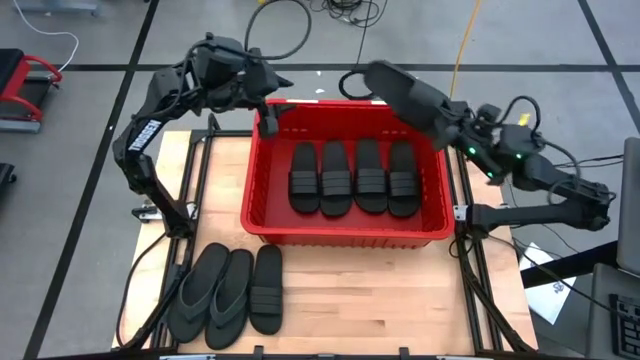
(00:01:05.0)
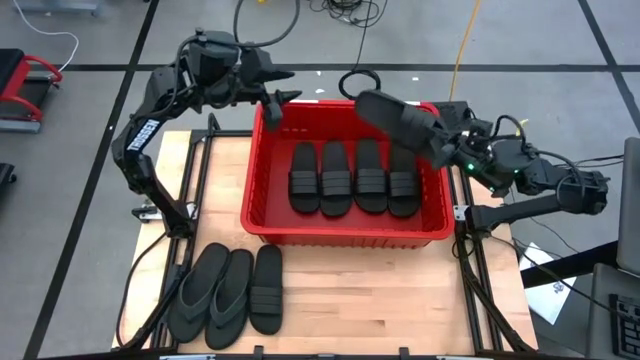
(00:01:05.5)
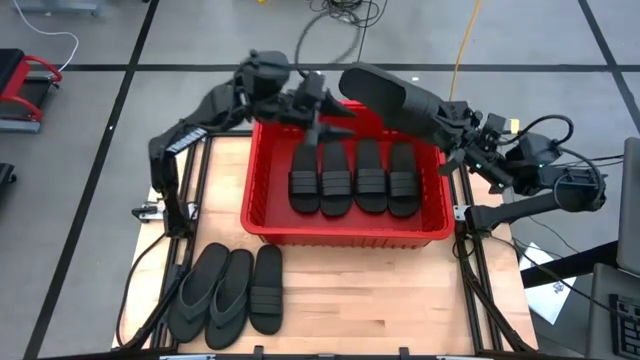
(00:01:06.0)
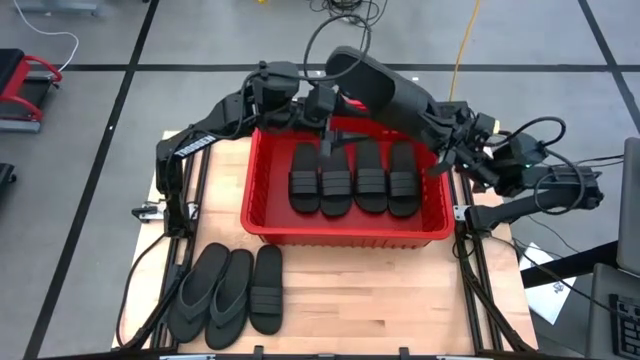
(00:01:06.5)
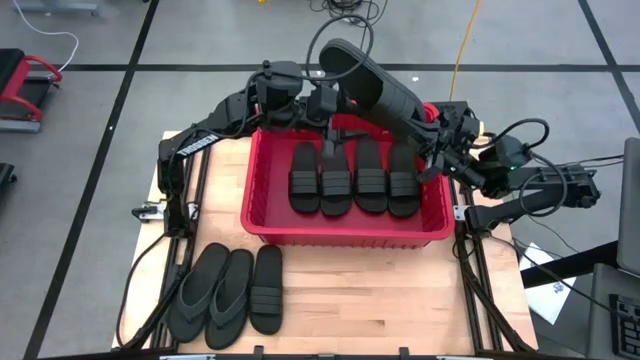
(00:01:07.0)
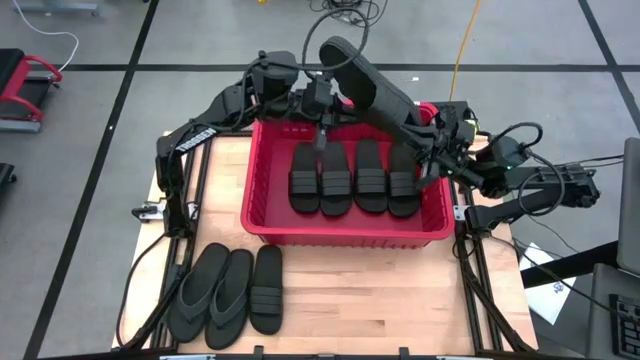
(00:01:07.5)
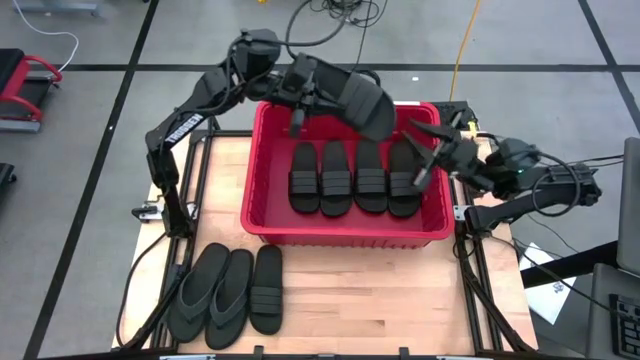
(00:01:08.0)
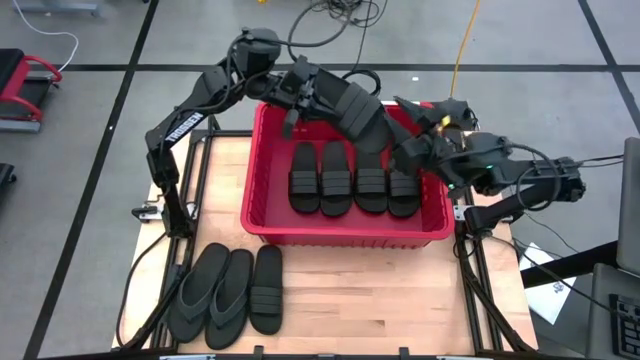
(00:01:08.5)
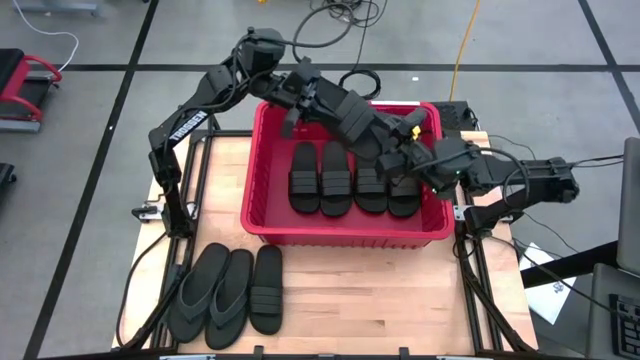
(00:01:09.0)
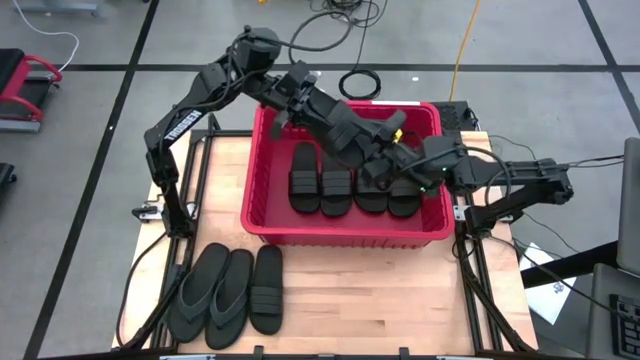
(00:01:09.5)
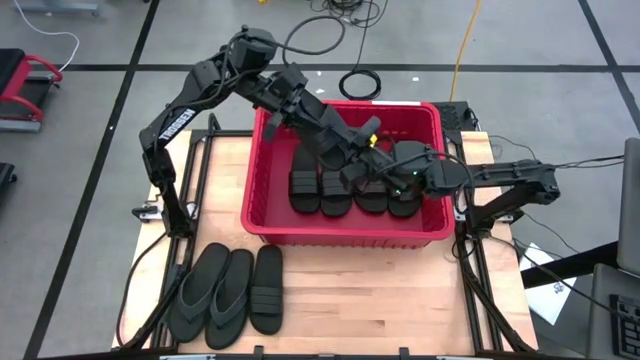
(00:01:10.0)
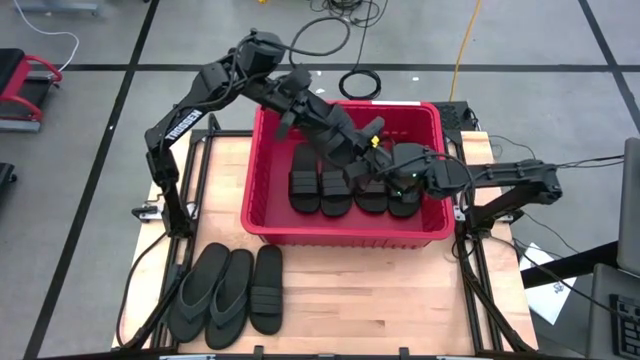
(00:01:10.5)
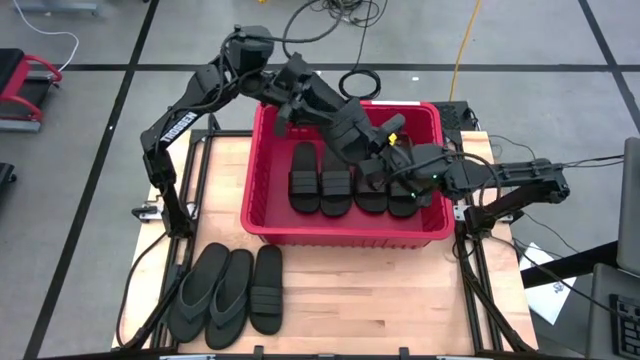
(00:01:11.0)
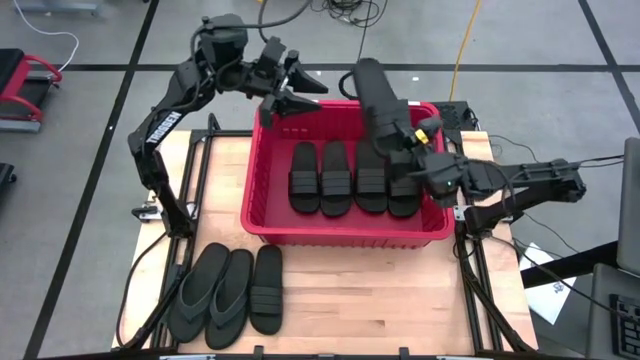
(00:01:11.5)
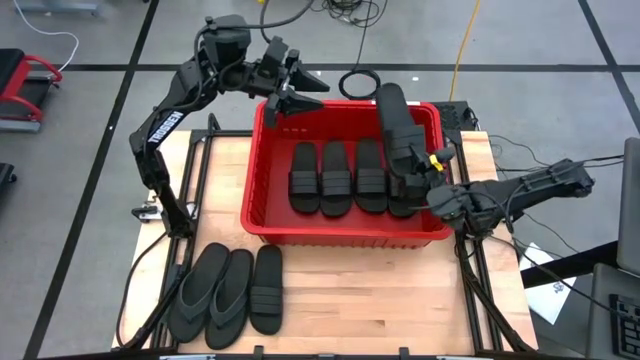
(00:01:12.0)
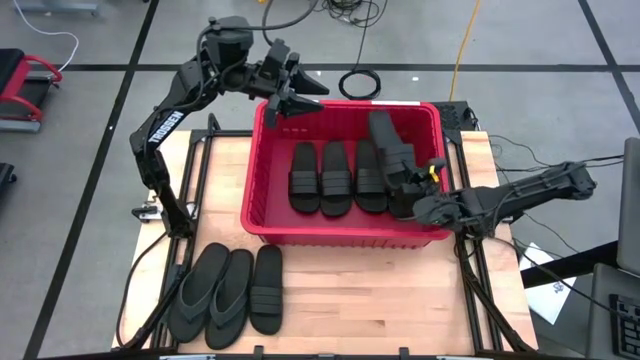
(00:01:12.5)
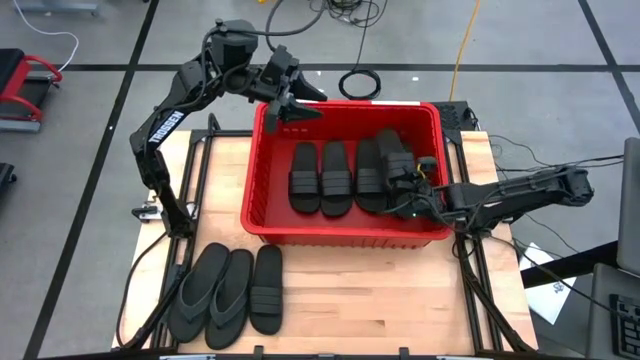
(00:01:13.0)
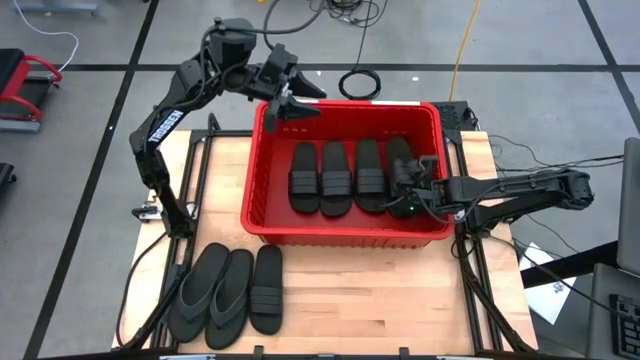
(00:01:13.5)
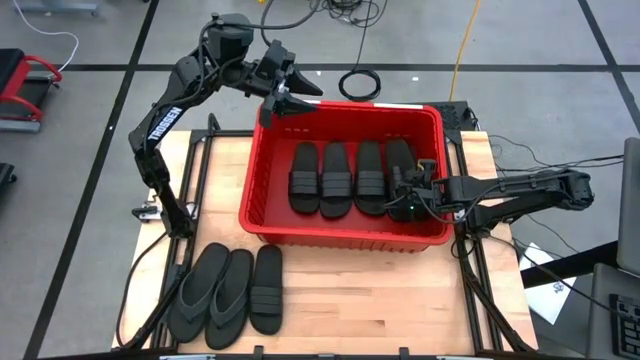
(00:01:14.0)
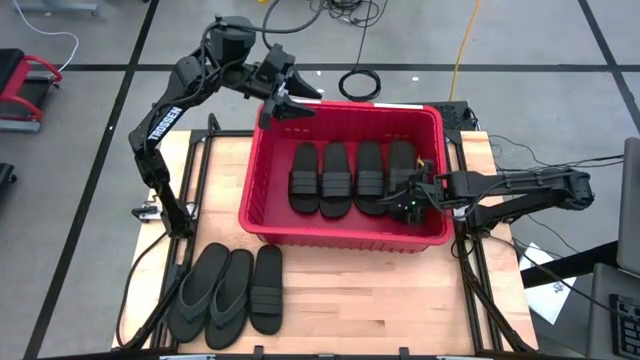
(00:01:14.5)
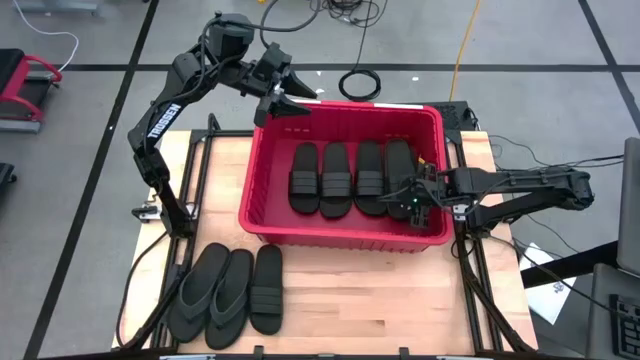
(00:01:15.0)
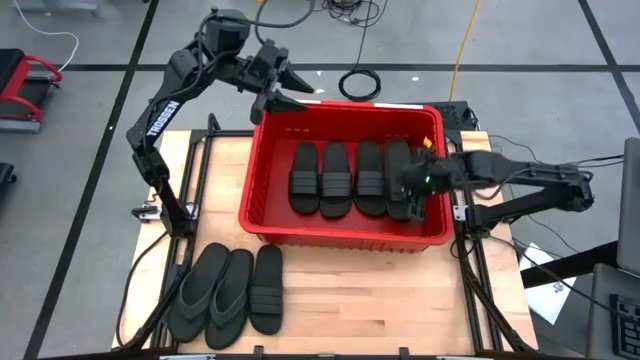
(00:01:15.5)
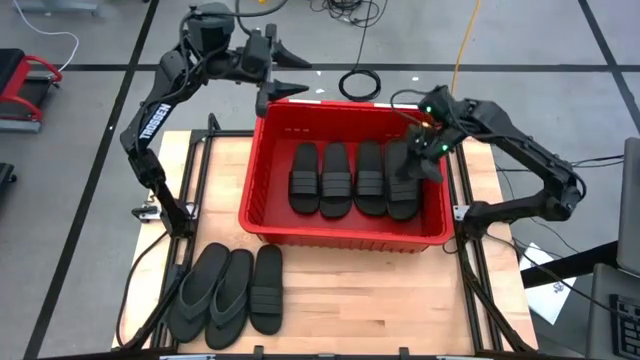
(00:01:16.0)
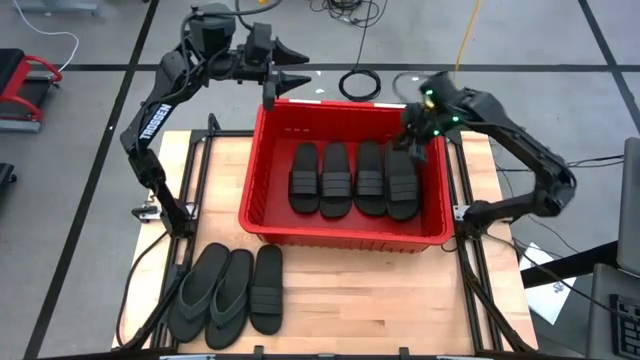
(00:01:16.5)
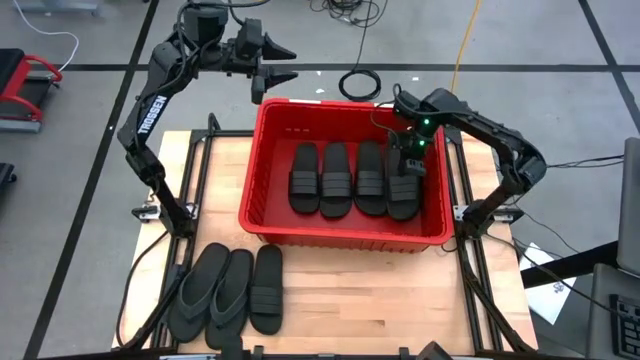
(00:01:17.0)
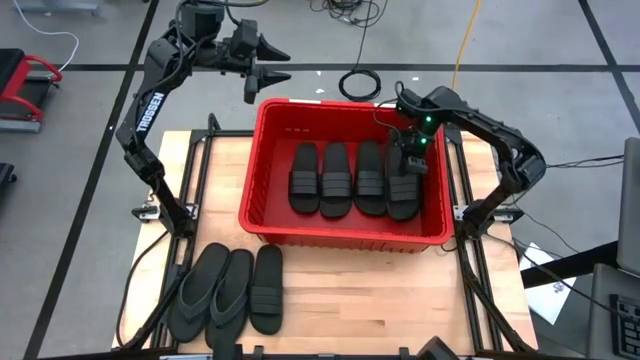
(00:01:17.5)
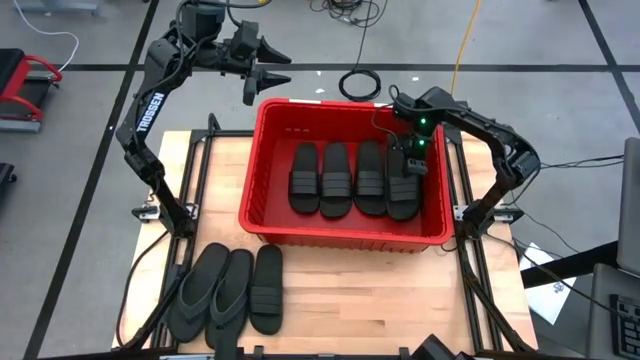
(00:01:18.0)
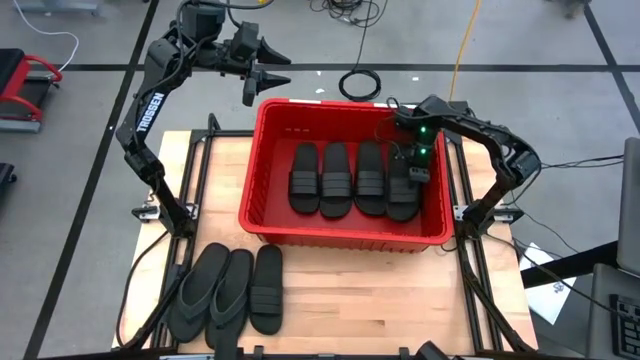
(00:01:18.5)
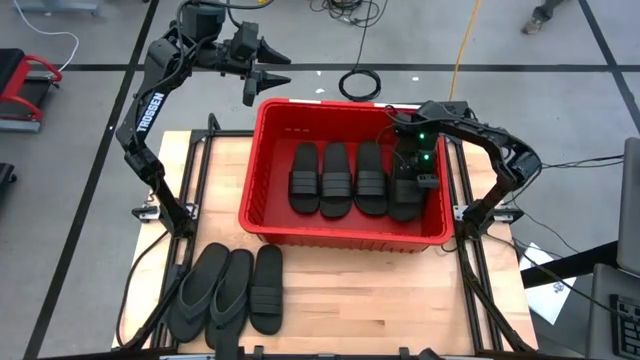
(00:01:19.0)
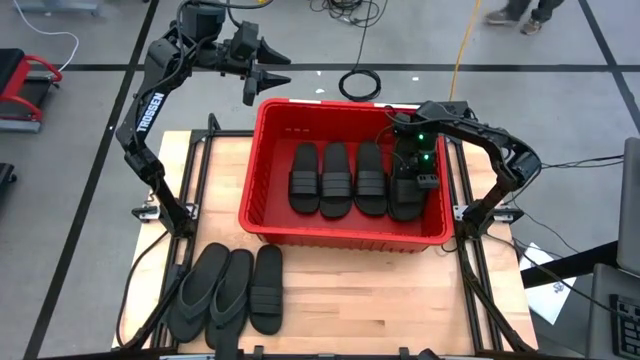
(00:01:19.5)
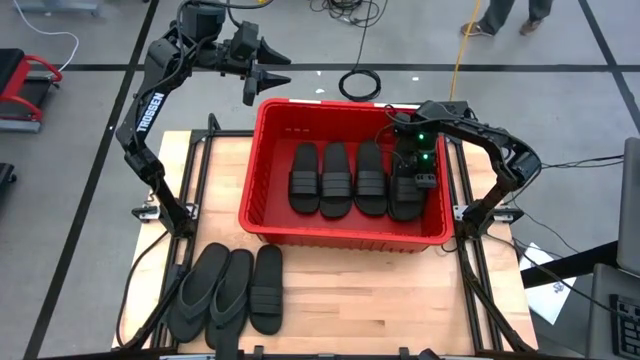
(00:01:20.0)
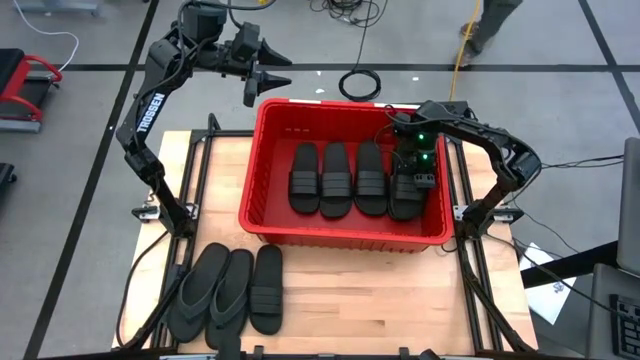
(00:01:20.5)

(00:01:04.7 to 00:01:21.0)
Task: Pick and place slides into bin
Put the black slipper into the red organizer bin

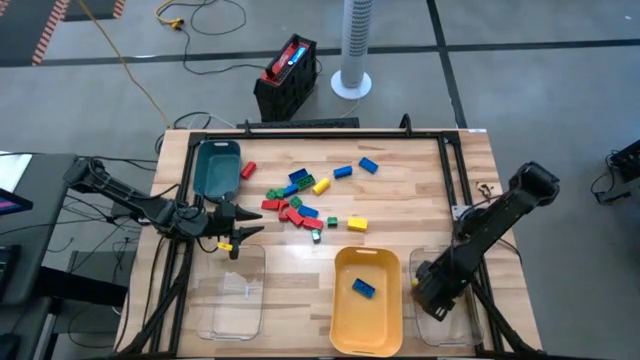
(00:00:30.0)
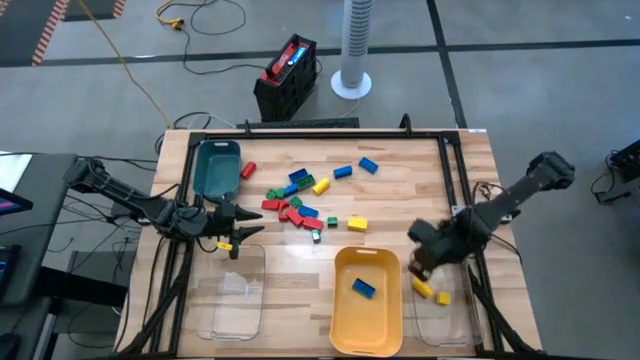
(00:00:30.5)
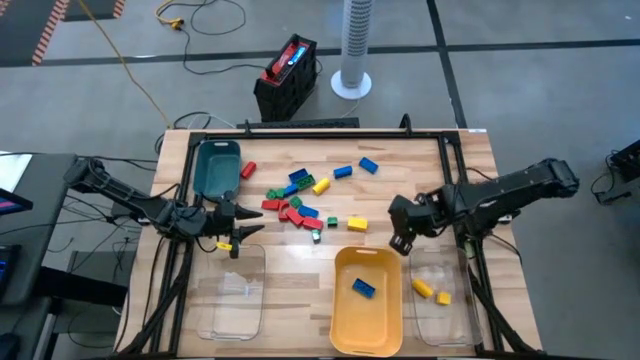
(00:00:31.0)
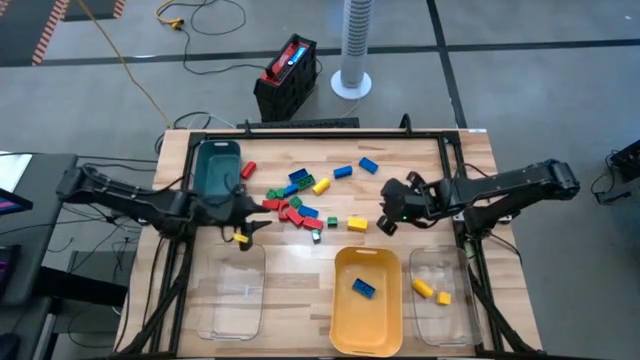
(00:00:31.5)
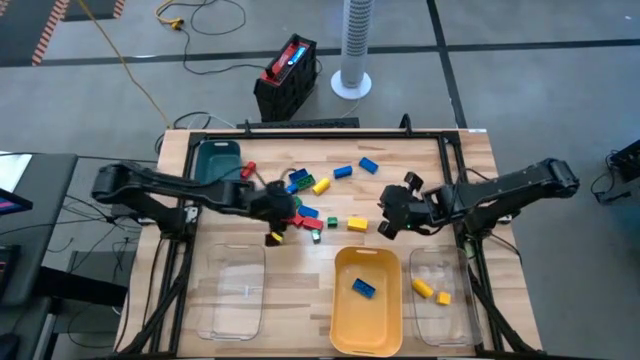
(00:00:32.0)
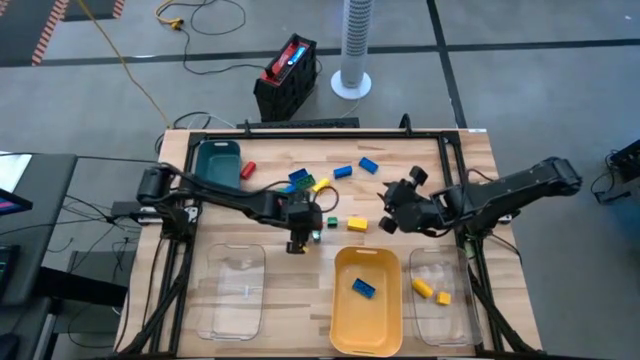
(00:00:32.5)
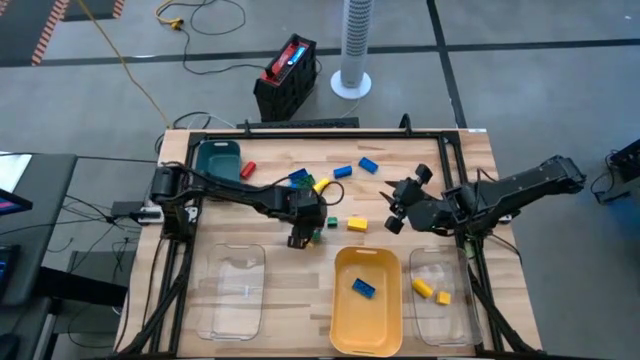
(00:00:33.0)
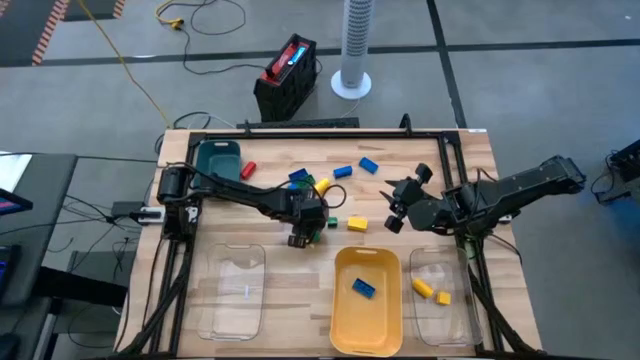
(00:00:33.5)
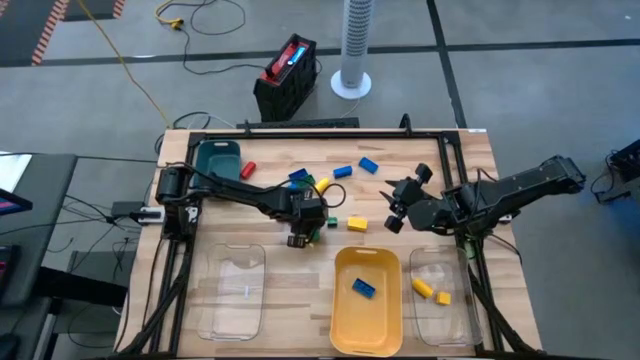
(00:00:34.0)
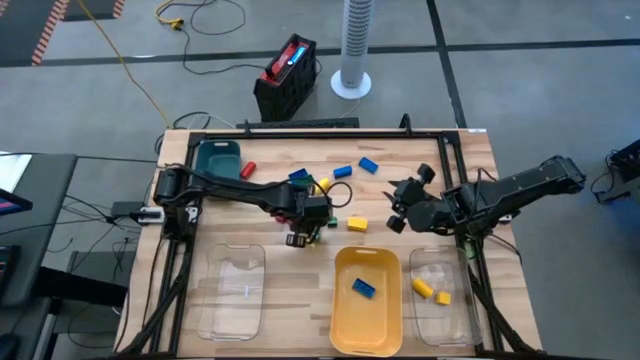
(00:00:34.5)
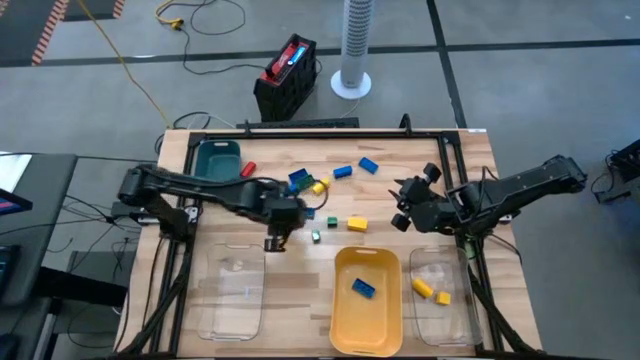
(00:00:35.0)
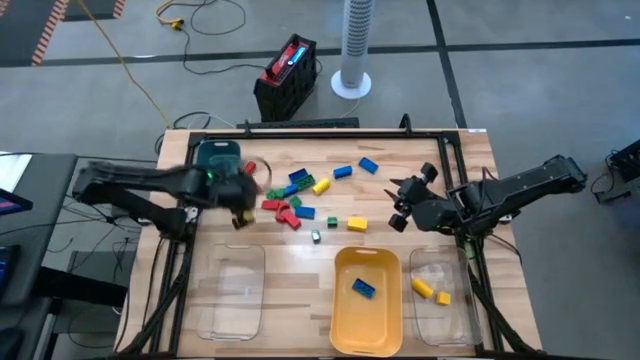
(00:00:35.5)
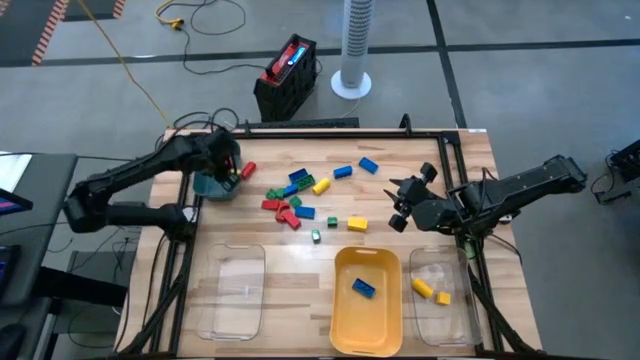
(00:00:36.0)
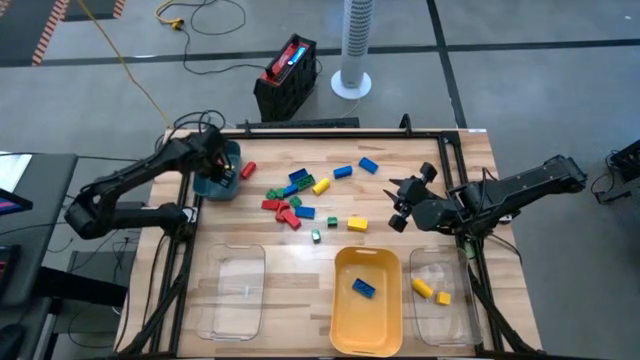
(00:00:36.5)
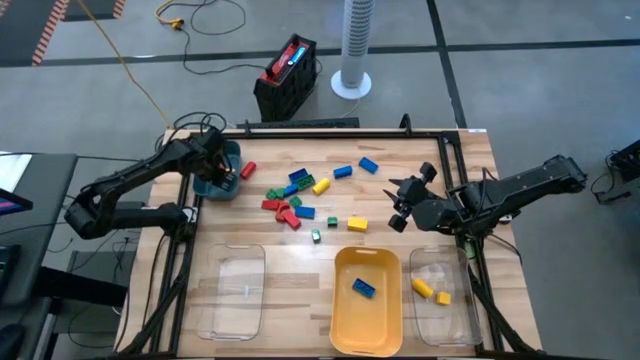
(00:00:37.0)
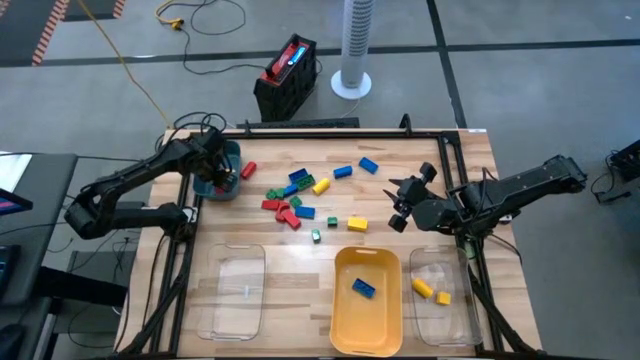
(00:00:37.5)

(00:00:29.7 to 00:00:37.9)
Task: Sort blocks
Put the red wooden block into the green bin
